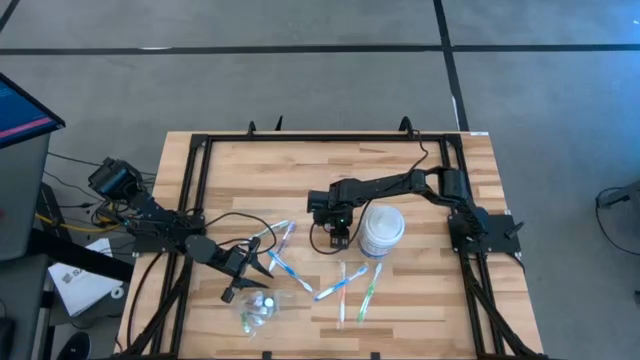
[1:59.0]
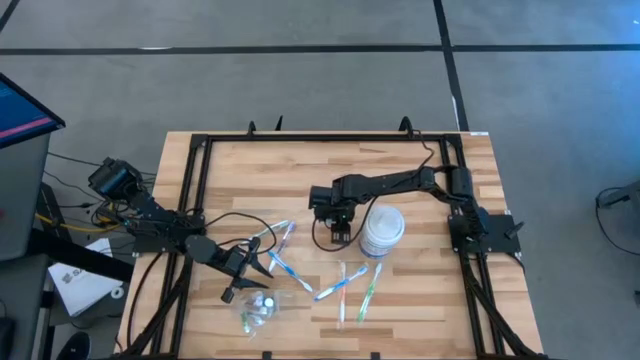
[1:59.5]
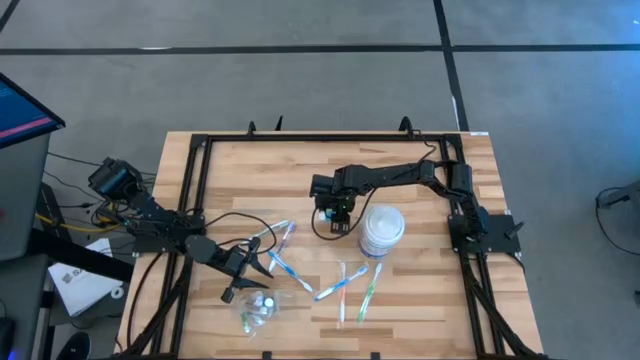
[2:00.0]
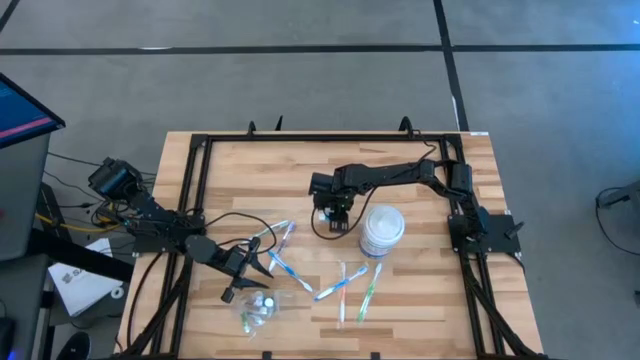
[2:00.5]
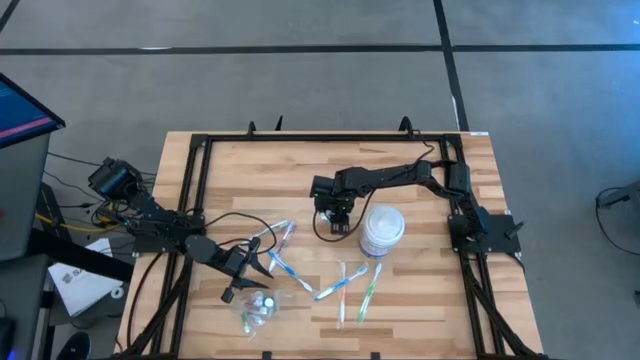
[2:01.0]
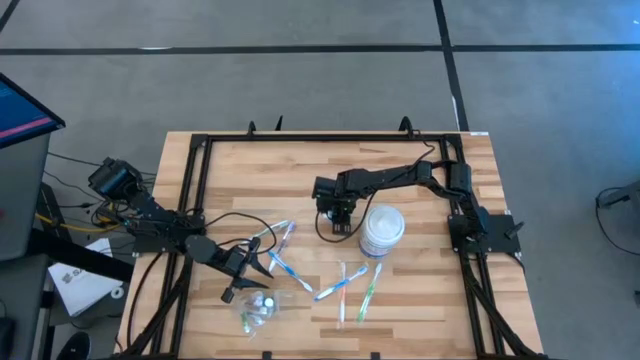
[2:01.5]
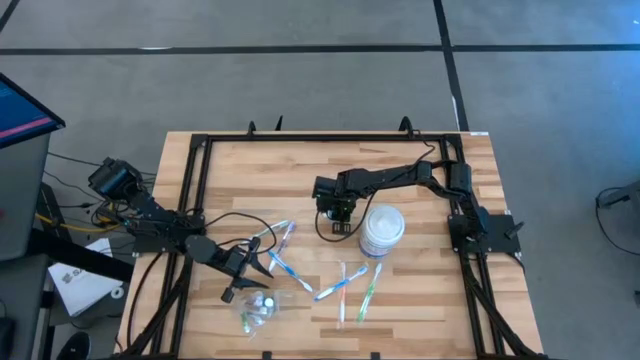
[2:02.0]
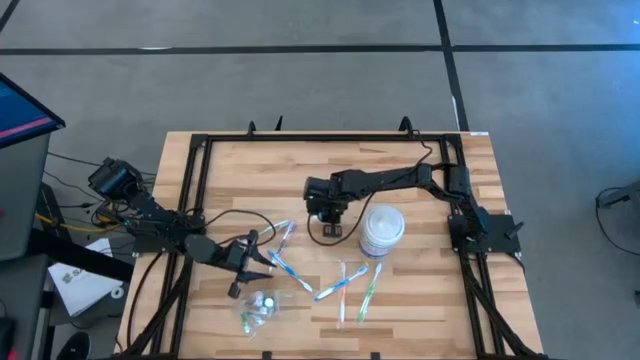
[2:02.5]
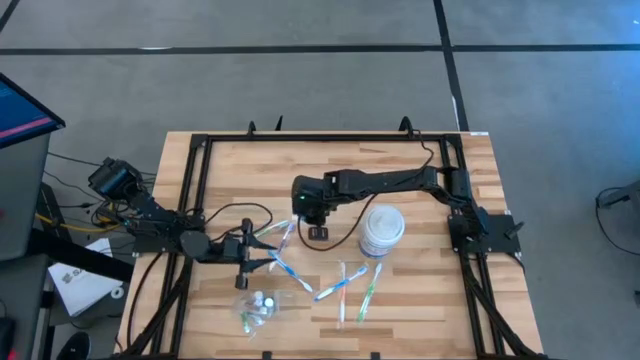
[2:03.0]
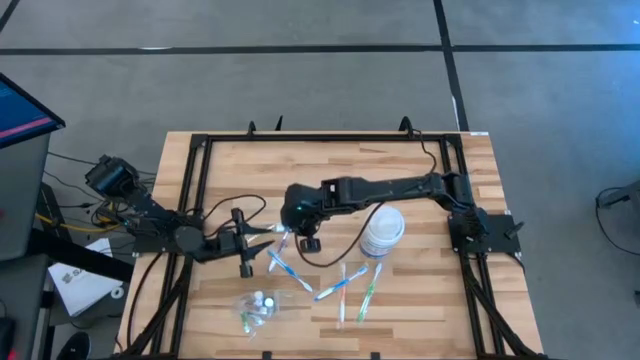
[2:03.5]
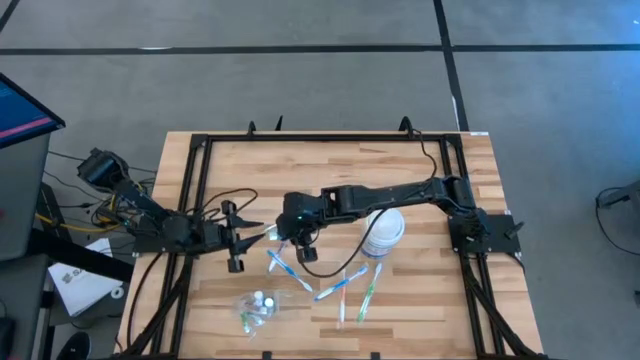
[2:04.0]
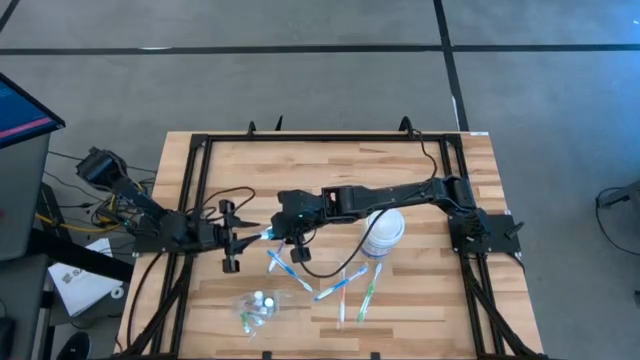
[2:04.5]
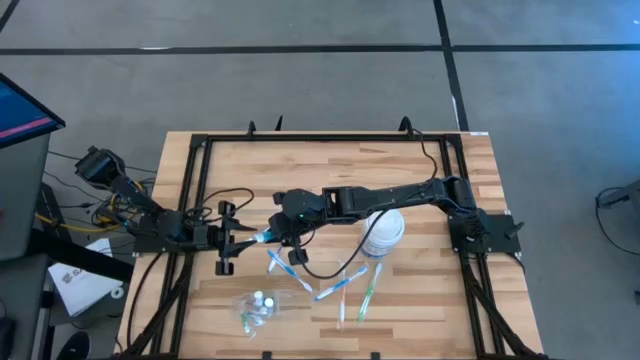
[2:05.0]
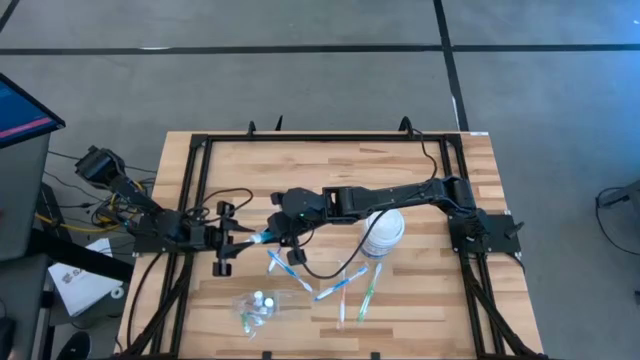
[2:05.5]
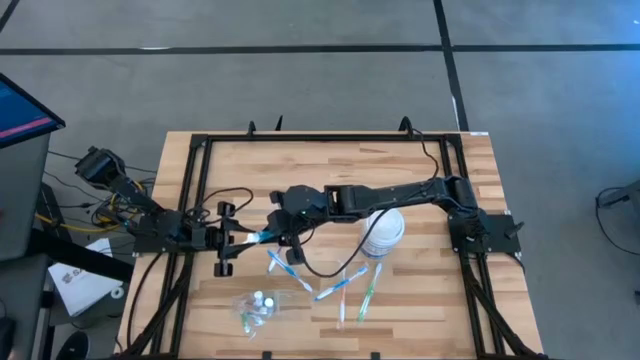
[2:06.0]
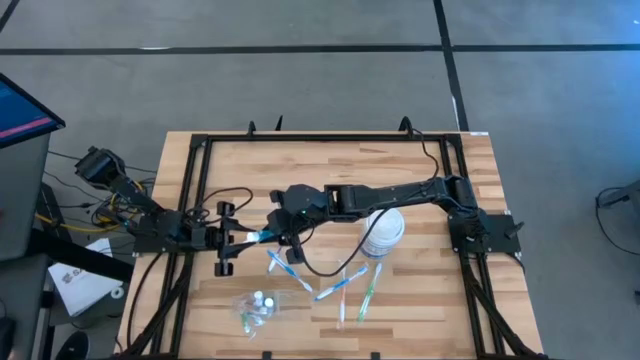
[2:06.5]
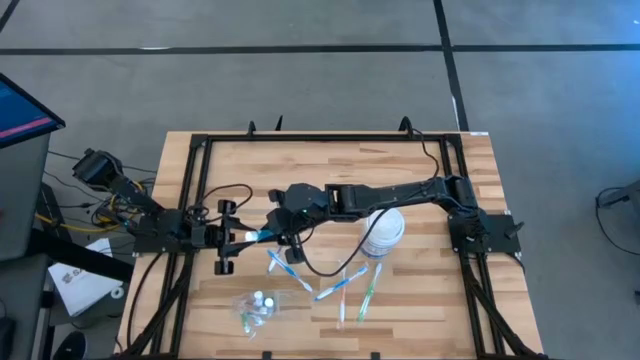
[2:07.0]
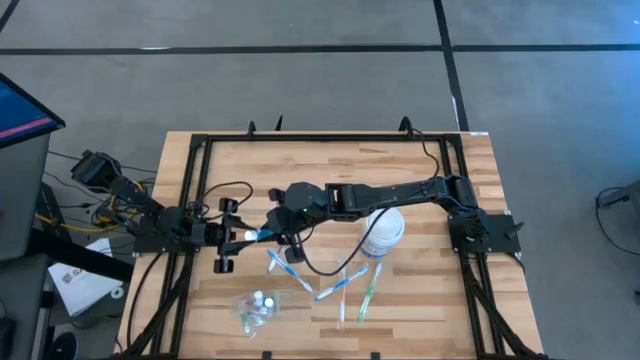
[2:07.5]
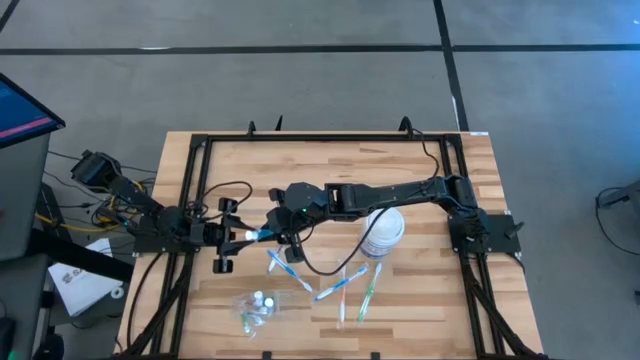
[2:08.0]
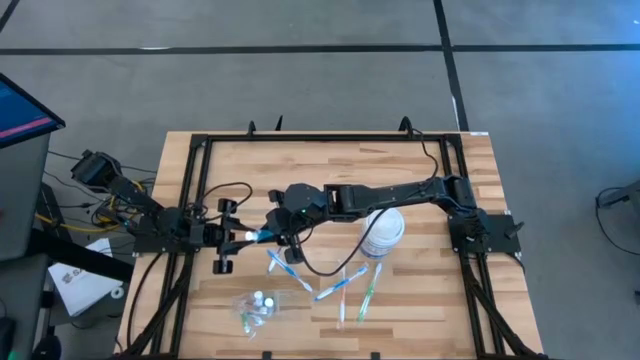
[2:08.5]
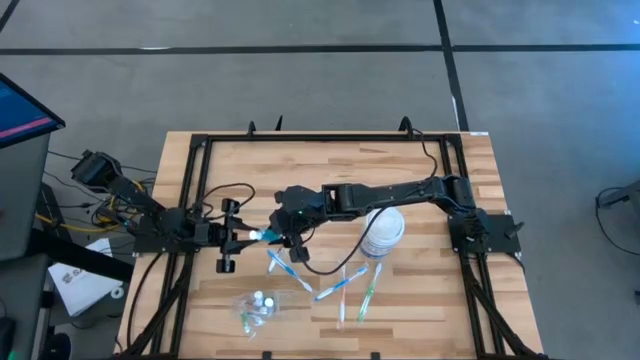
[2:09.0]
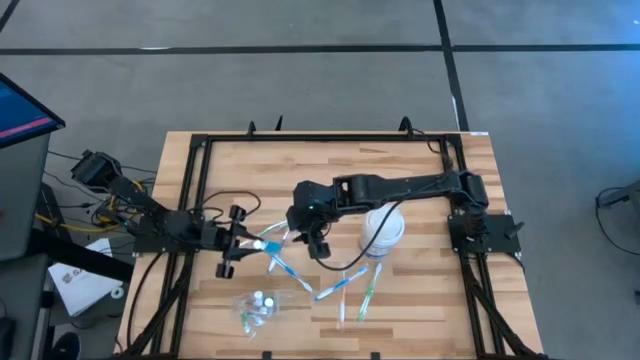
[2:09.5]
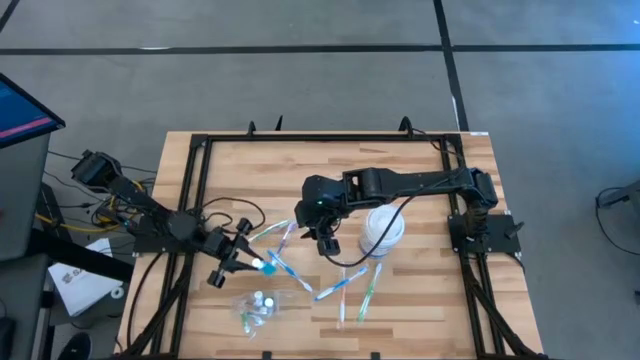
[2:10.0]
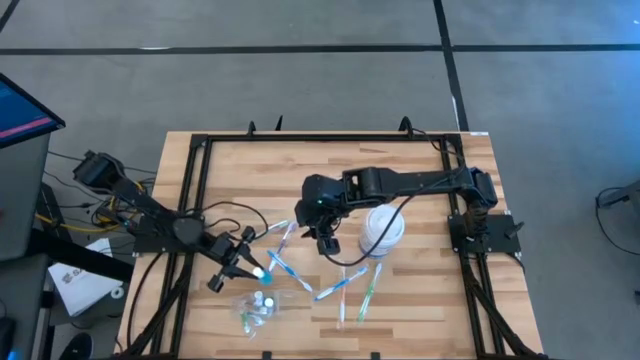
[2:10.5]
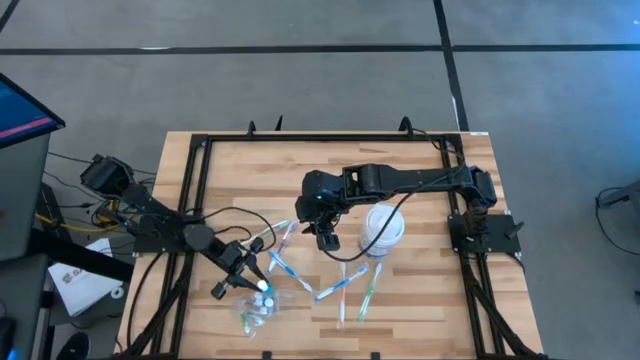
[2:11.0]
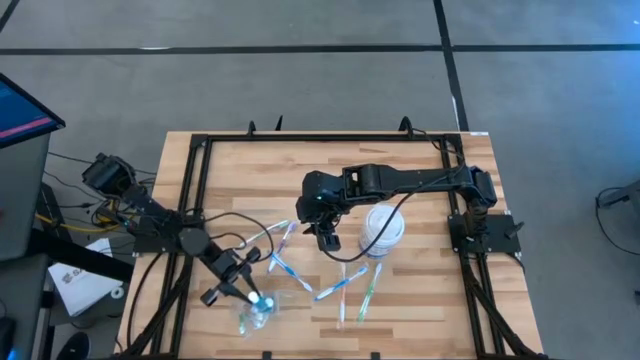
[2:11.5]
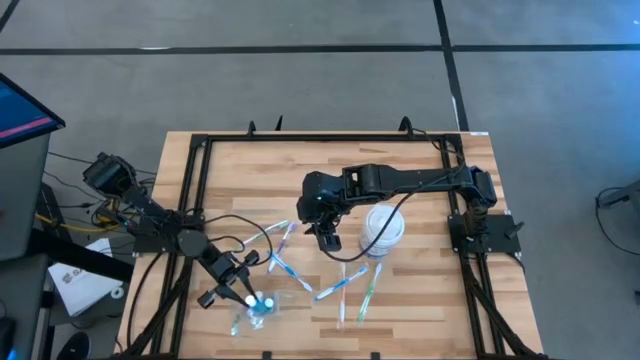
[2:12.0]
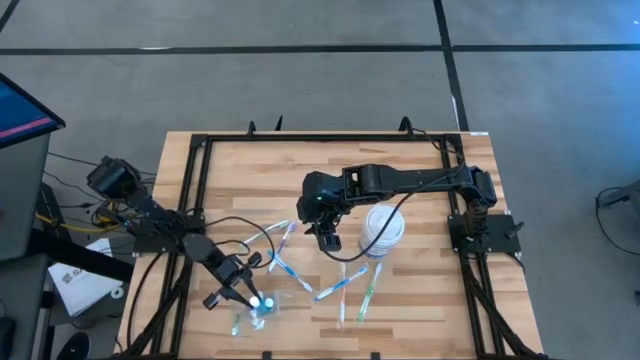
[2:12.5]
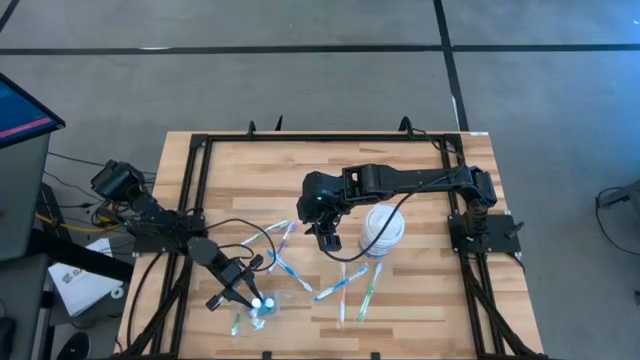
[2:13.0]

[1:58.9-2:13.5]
Task: Pick & Place toothbrushing station
Put the blue mouthwash into the transparent organizer

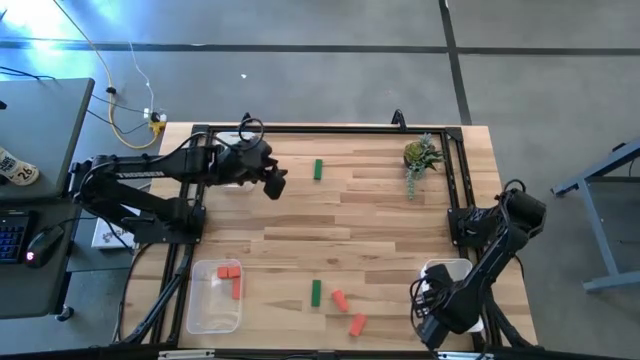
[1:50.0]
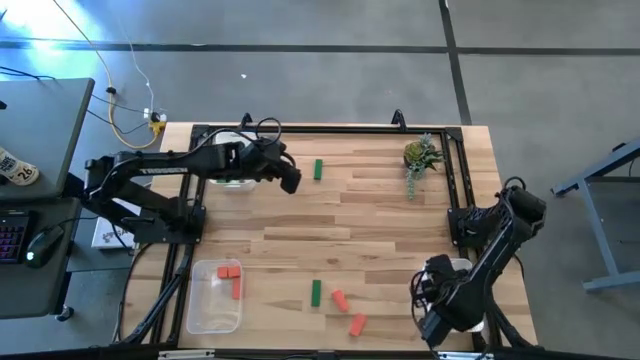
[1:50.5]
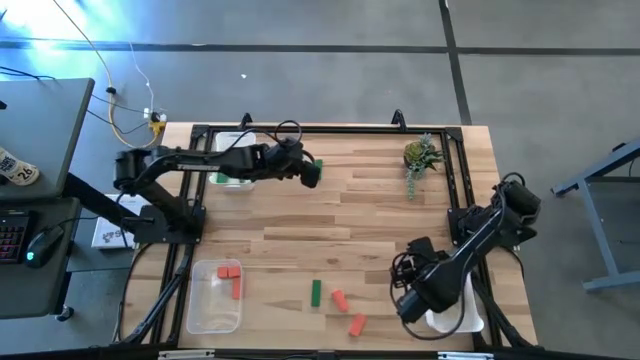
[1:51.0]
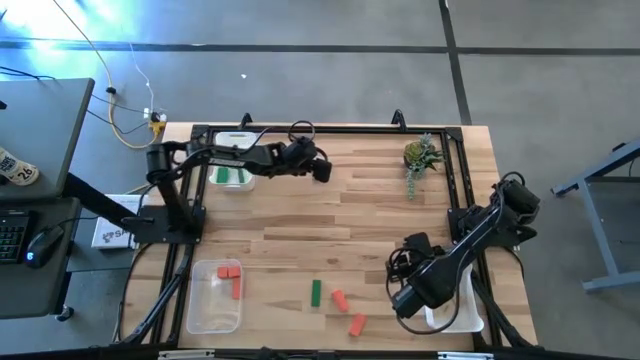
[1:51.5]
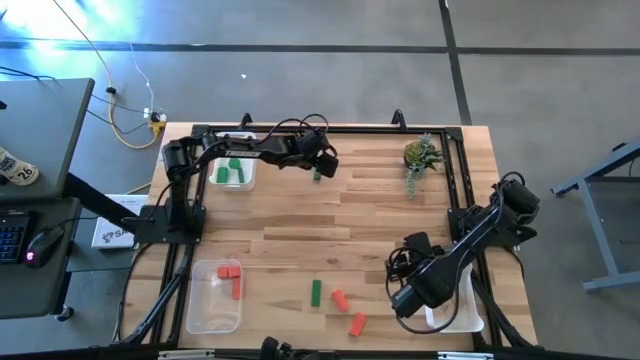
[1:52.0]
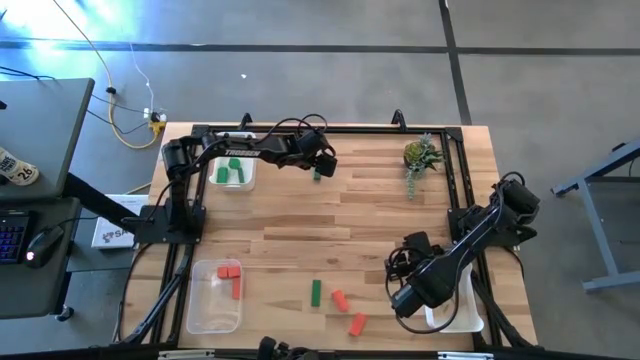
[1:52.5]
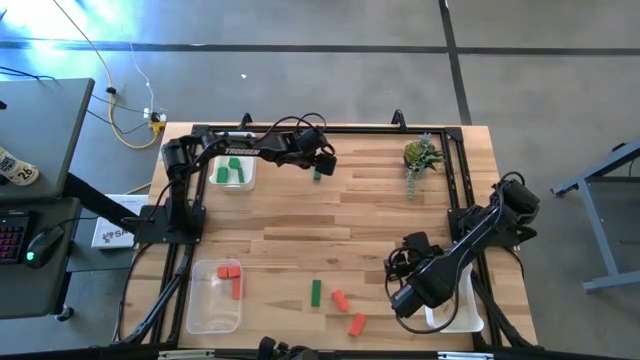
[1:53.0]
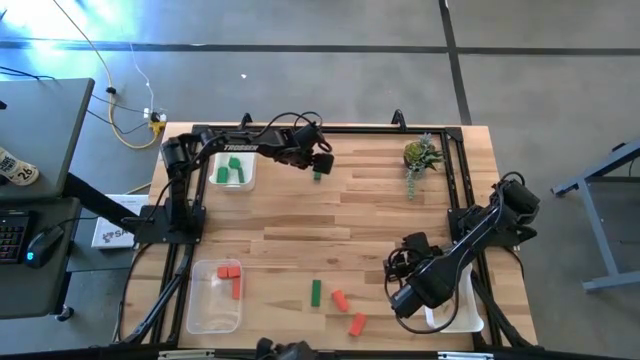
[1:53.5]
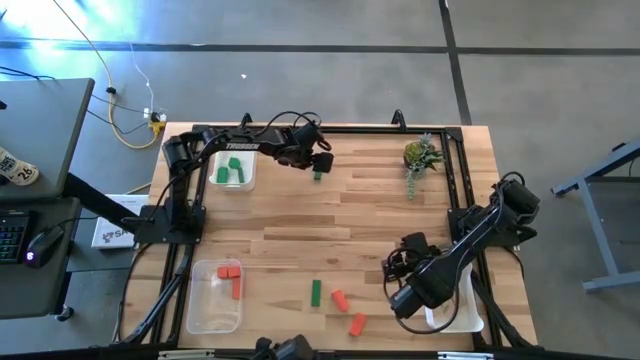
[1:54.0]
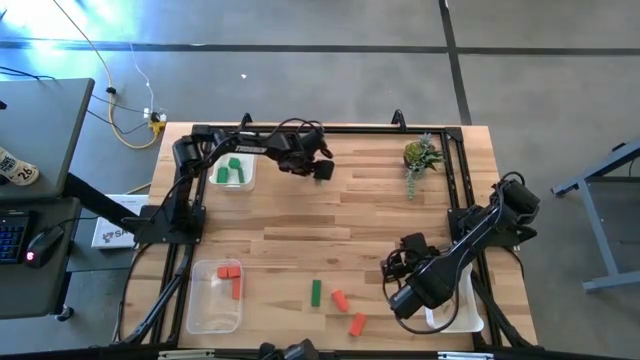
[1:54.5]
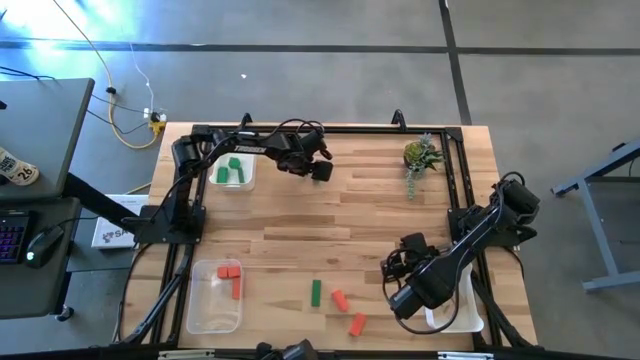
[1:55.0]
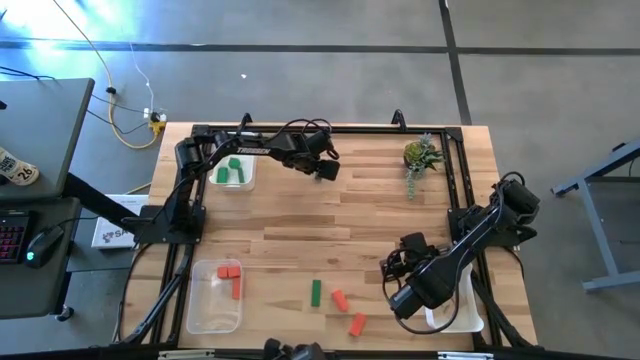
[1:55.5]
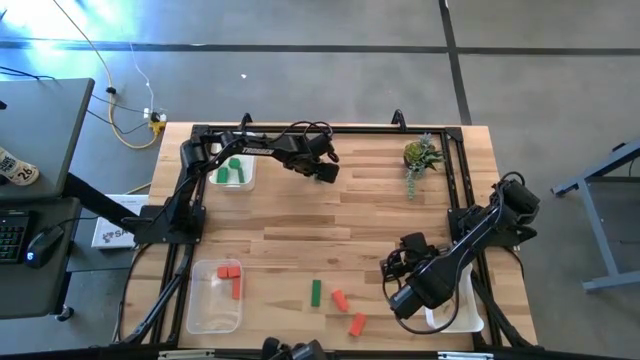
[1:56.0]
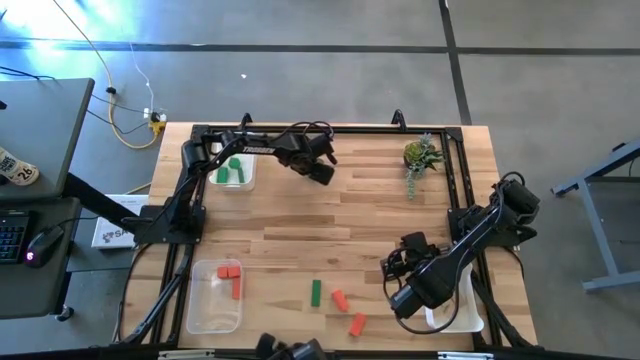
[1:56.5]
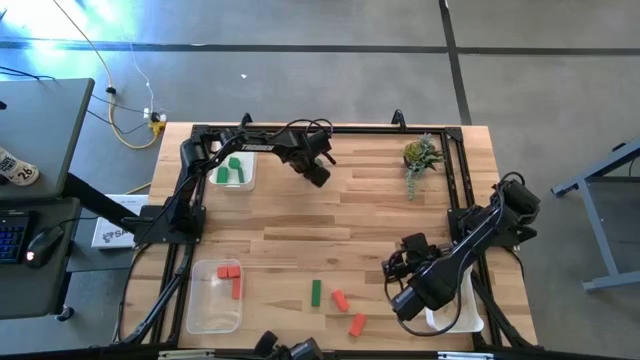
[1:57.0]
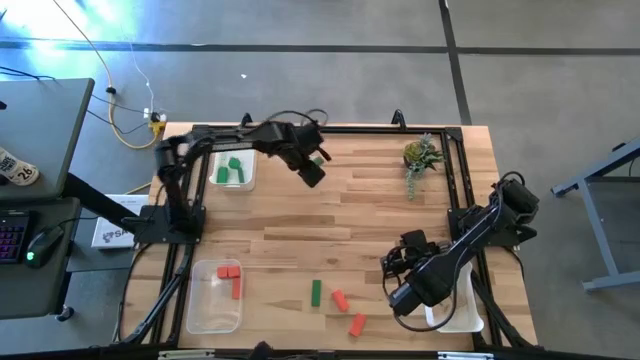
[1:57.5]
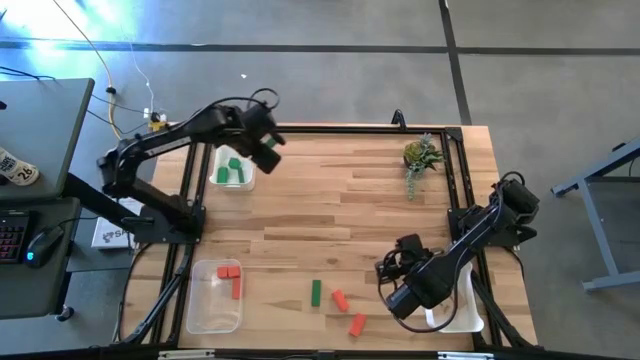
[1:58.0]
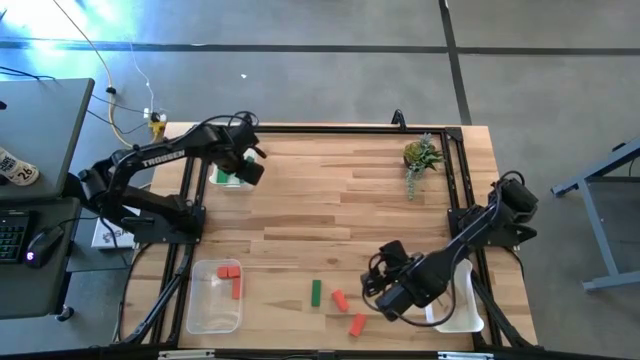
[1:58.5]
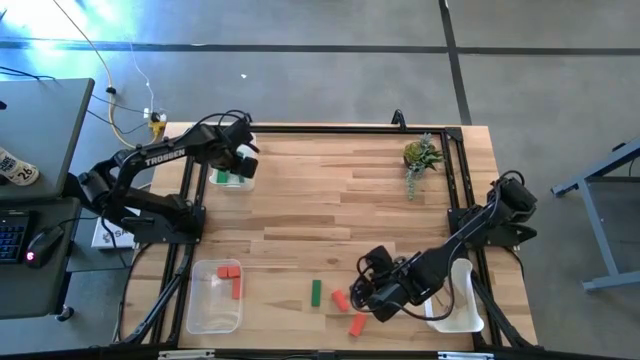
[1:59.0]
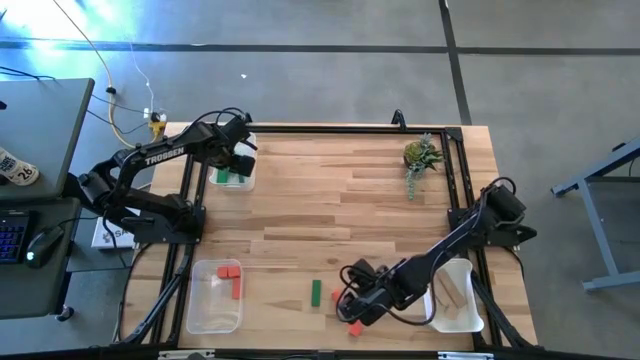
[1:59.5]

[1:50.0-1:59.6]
Task: Sort & place blocks by color
Put the green block into the top white bin
